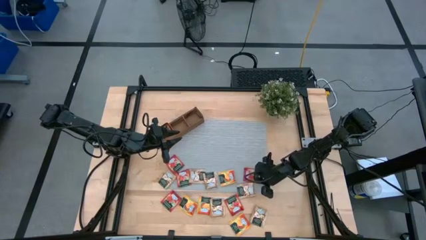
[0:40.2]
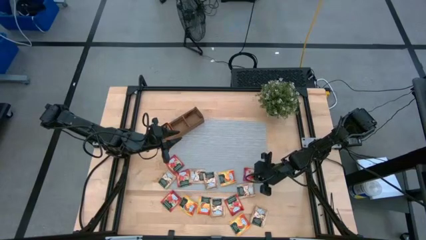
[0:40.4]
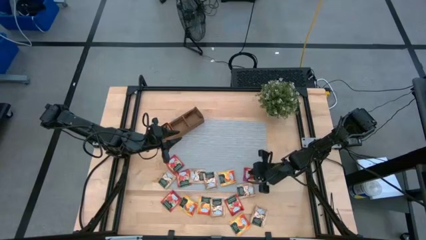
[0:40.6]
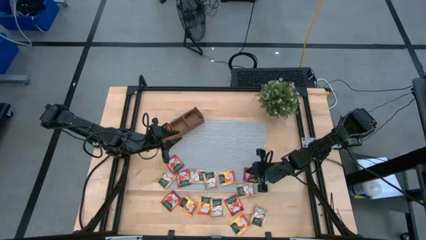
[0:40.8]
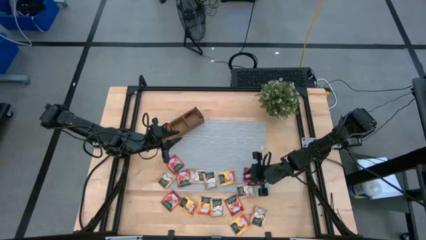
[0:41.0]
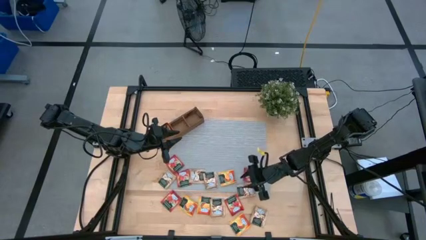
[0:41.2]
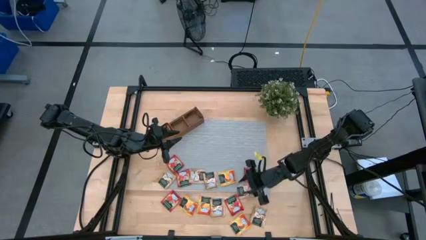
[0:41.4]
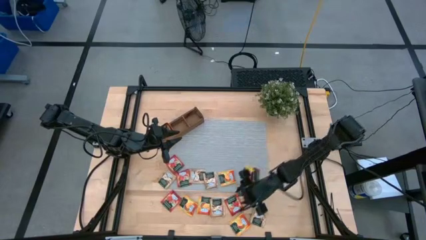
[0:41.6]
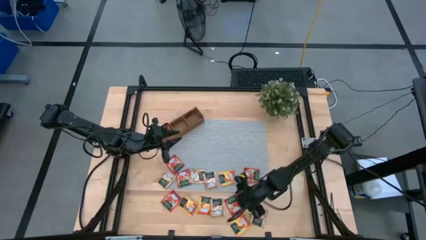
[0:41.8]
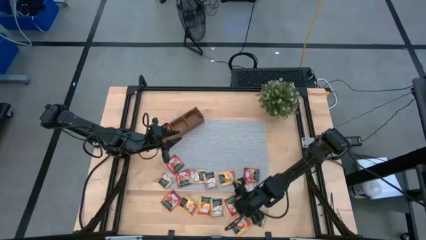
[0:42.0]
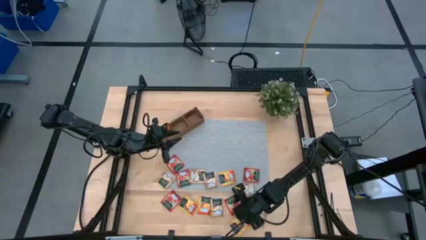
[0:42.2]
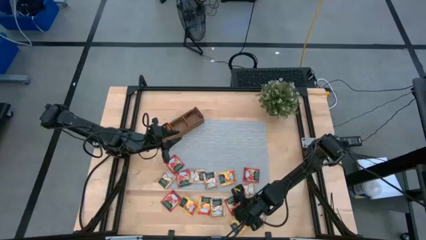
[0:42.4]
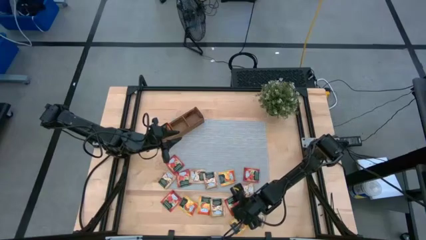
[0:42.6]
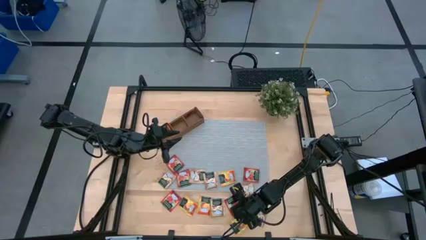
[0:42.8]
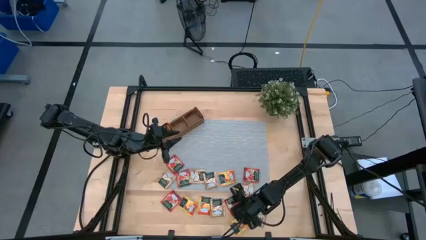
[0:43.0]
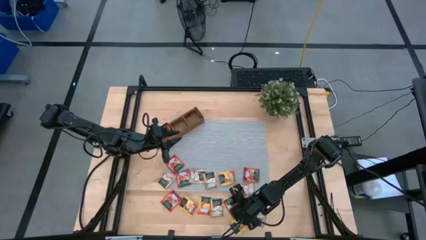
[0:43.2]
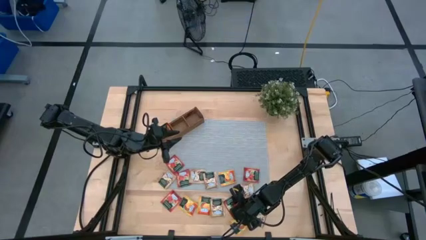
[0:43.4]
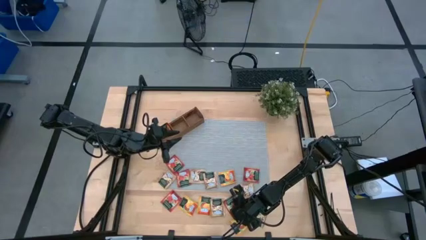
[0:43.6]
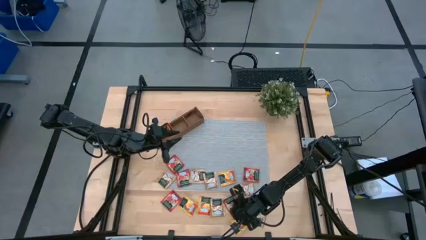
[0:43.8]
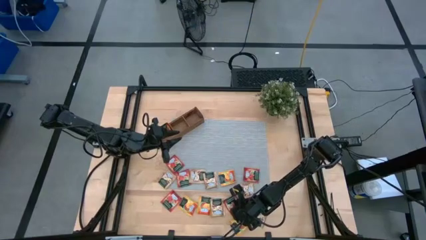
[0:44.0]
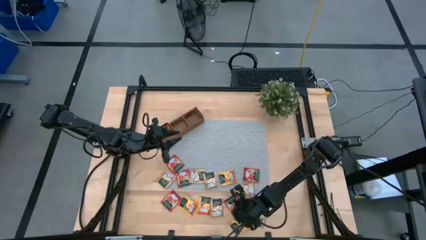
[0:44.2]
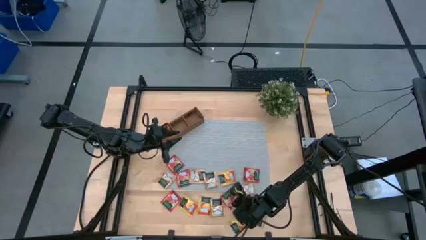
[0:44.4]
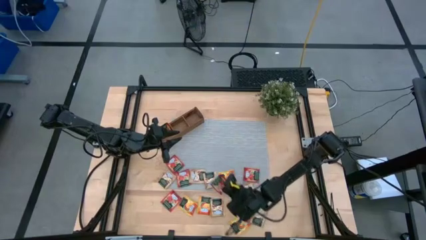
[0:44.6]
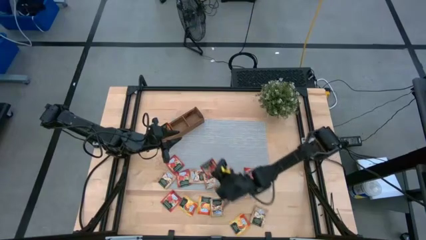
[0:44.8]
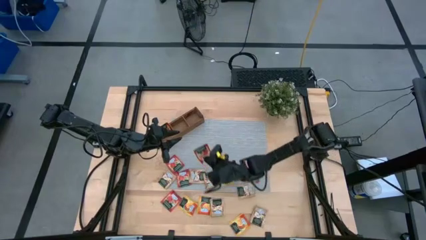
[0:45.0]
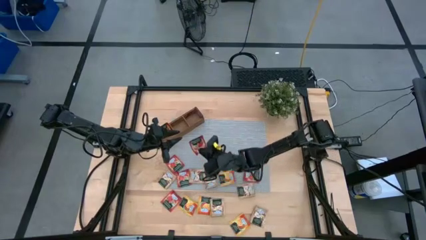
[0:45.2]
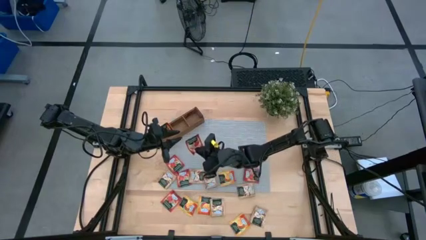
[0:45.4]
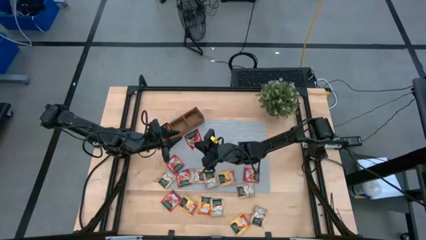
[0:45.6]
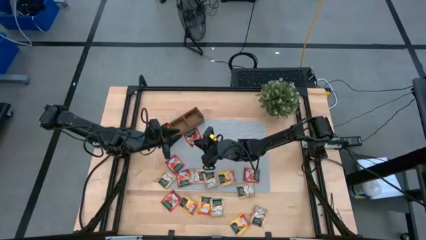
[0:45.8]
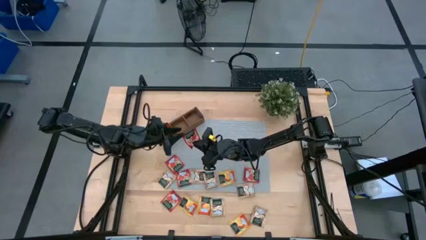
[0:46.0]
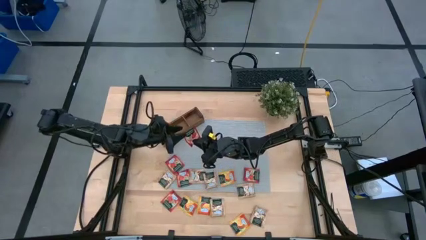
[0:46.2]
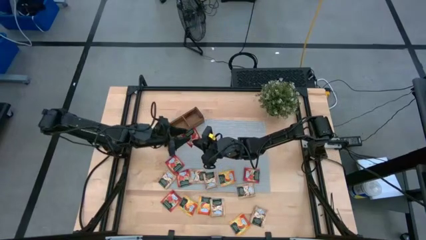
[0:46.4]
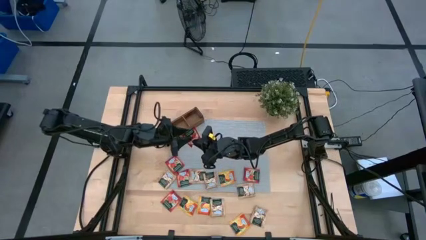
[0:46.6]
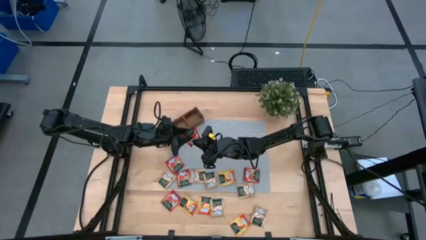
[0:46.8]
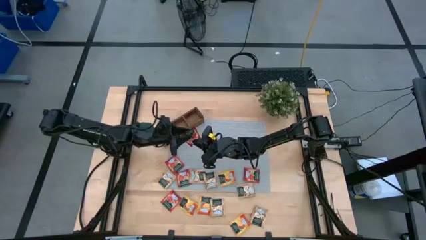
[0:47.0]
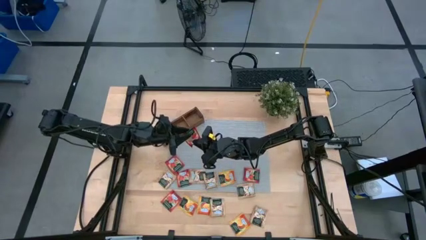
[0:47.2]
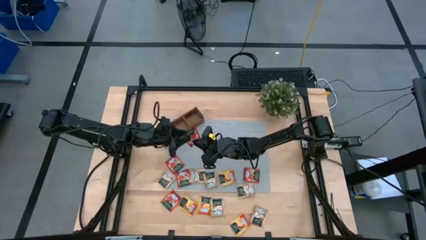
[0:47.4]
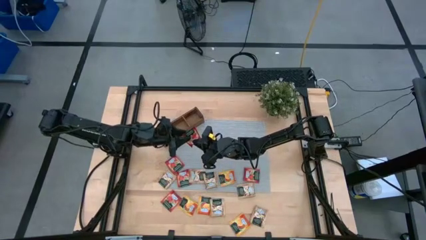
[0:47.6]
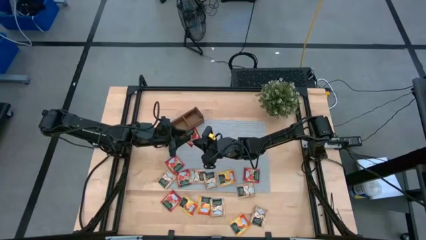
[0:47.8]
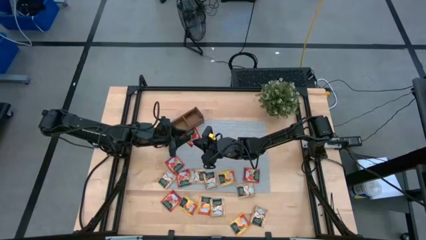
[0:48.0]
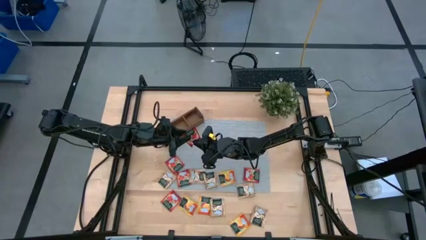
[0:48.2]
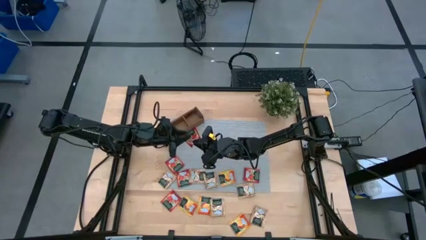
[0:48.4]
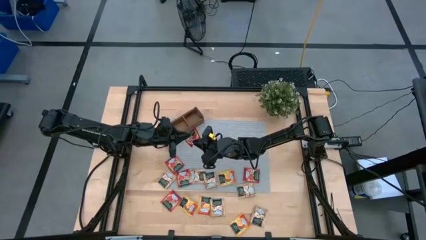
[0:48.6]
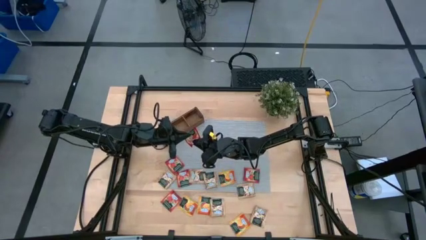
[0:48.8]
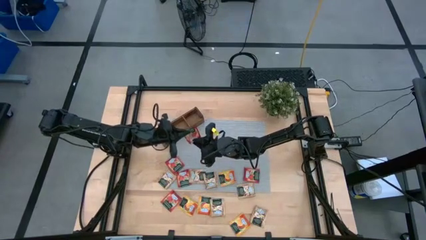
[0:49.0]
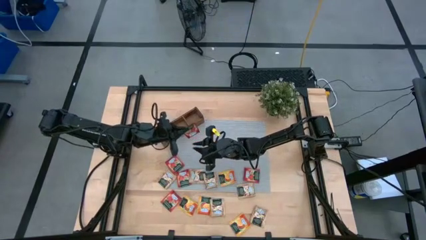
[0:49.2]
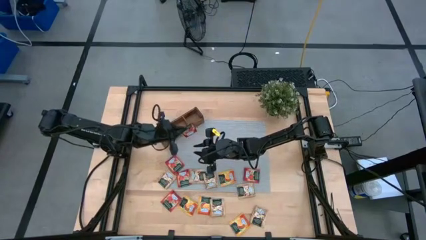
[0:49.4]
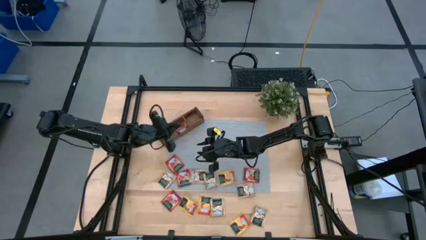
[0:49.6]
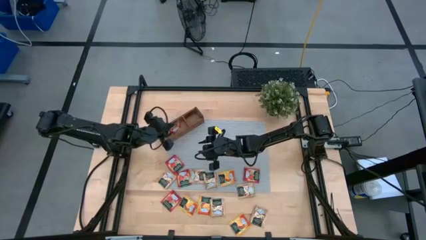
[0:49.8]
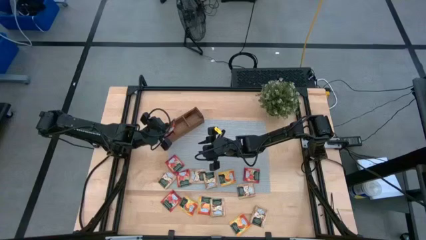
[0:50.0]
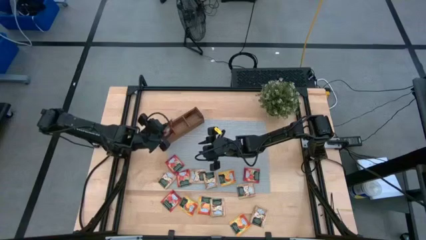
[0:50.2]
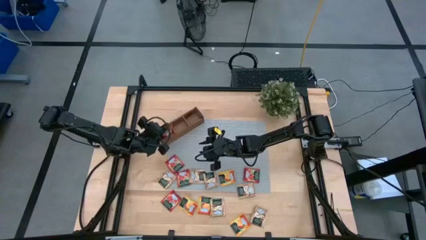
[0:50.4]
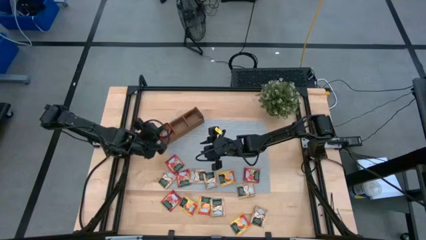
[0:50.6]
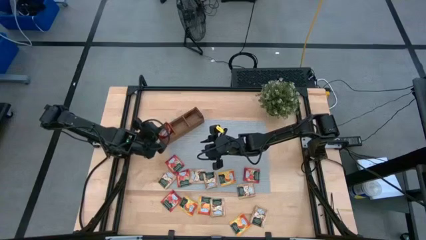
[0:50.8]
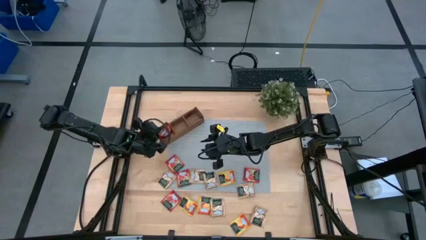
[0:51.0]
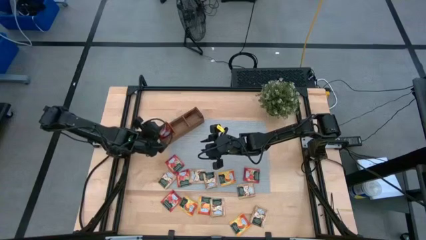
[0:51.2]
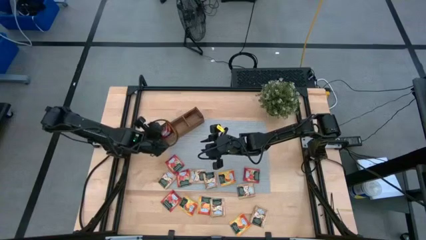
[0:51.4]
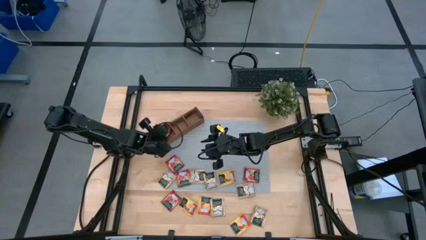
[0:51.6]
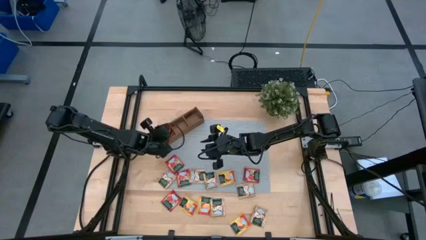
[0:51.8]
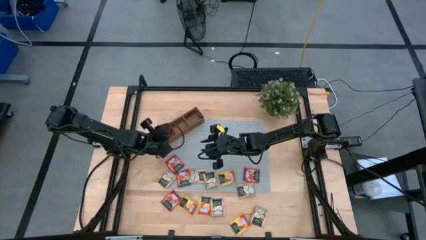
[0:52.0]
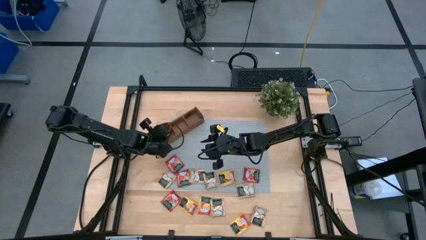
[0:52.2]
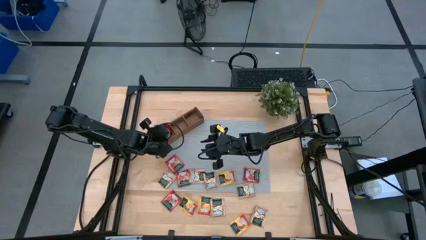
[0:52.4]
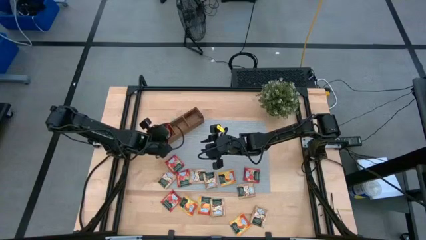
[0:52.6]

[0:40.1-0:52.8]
Task: Pick & Place Tea
Put the red tea bag into the left section of the wooden organizer

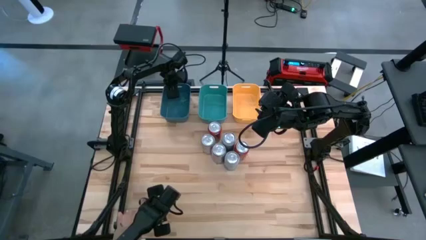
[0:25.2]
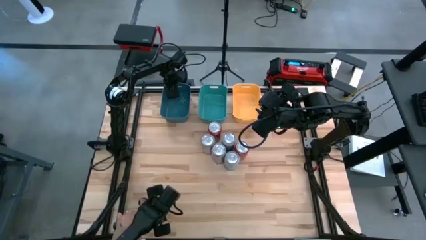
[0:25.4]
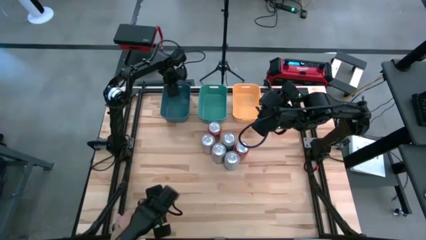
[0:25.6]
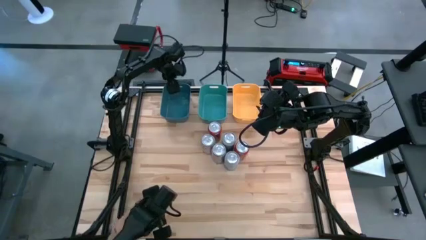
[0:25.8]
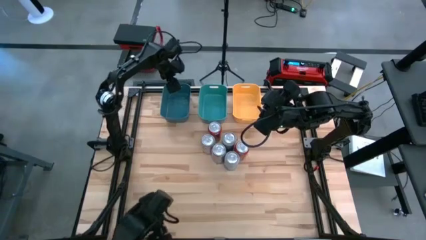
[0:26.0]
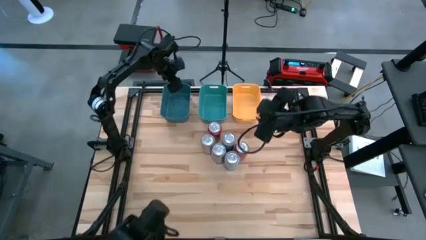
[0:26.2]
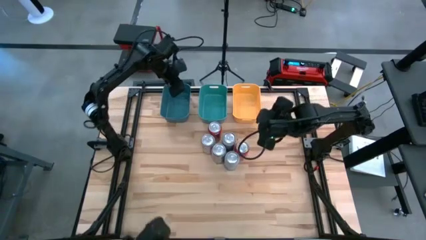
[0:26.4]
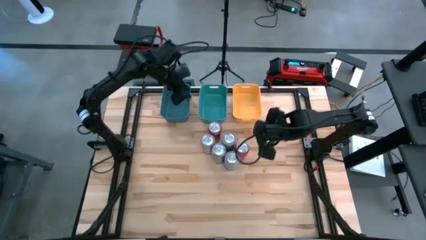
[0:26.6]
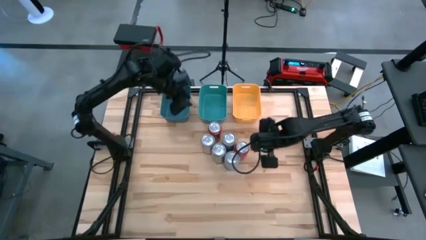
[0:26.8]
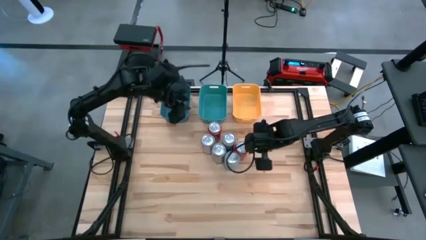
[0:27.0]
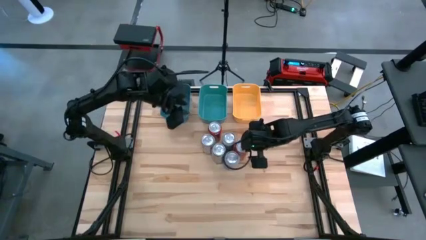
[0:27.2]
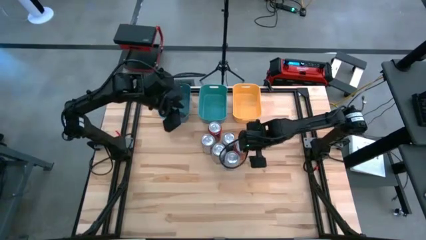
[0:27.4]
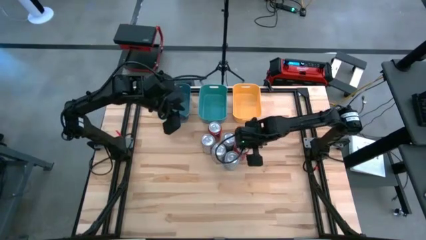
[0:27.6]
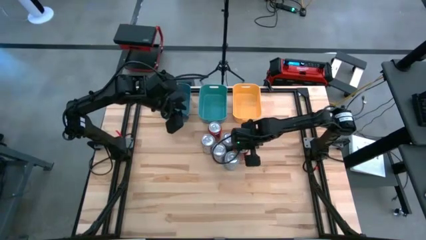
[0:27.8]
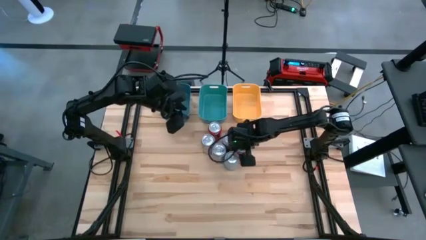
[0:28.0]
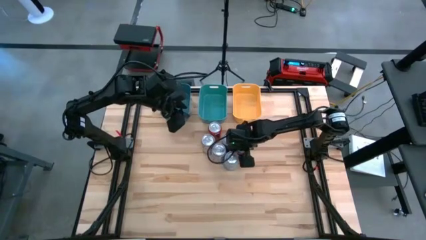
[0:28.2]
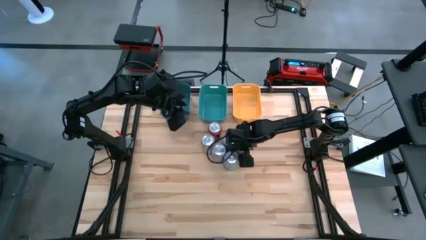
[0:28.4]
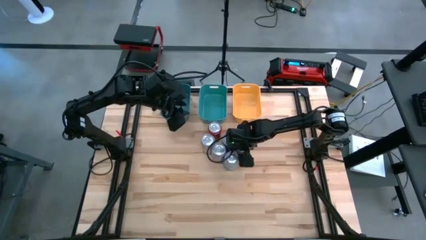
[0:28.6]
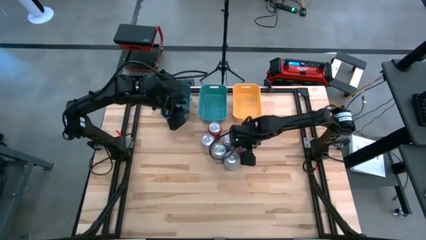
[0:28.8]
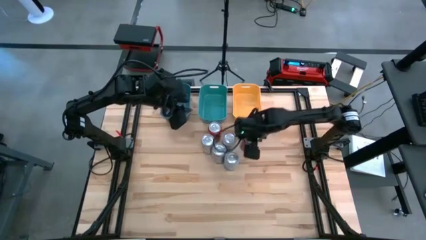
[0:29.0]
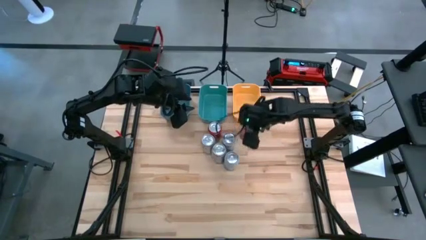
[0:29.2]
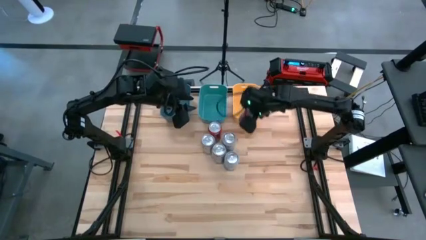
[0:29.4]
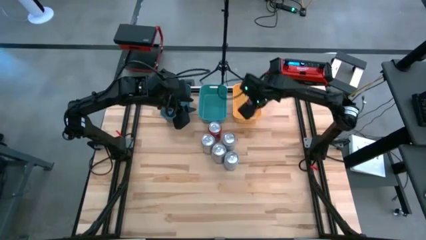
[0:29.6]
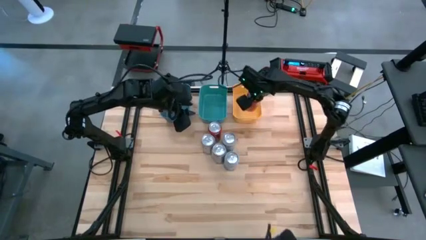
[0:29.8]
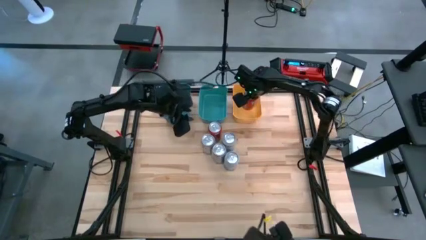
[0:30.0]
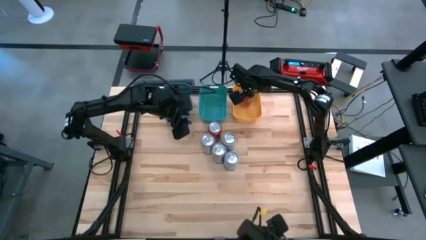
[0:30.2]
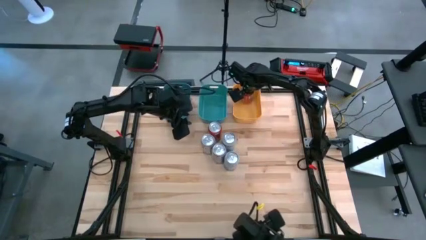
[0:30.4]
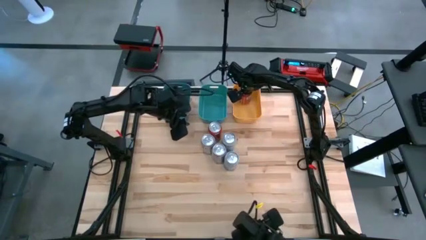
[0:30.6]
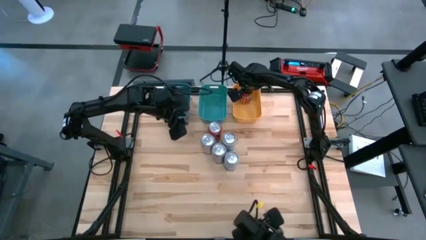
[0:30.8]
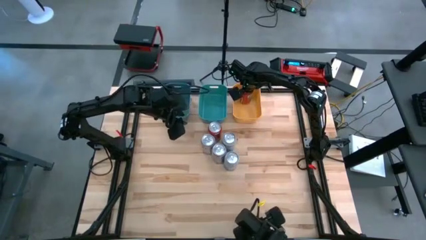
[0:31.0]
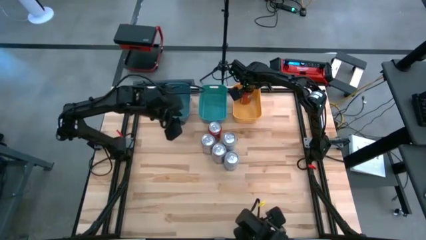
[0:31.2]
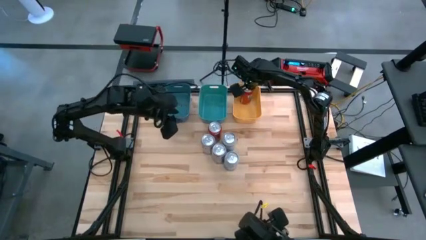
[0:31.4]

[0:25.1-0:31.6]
Task: Sort soda cans
Put the bottom red soda can into the yellow bin
